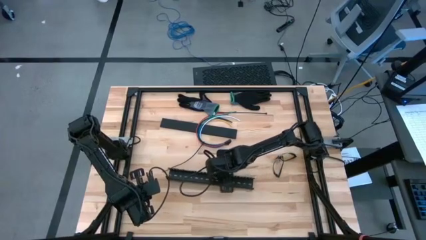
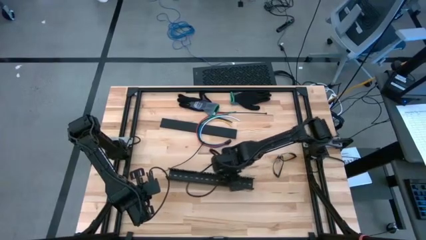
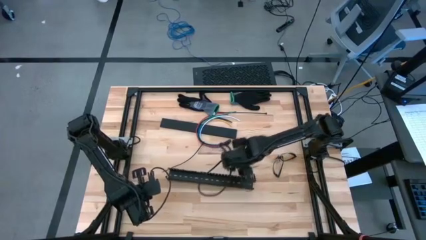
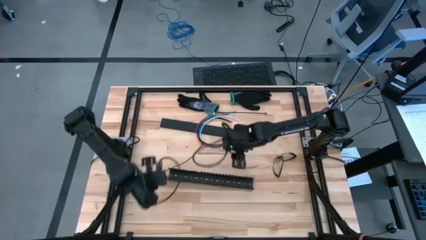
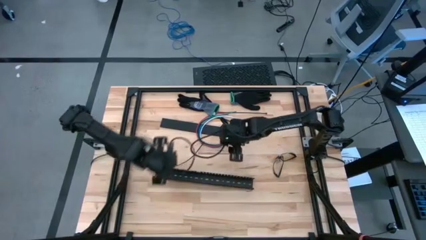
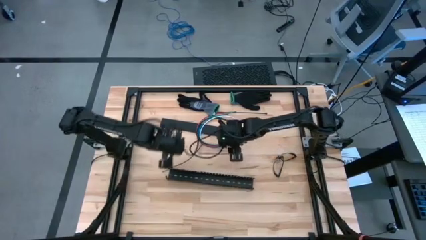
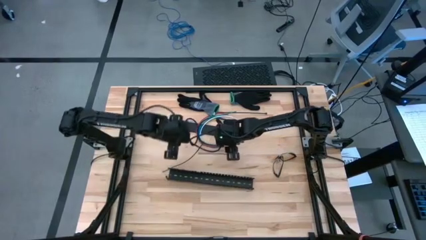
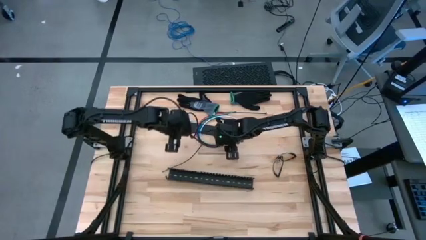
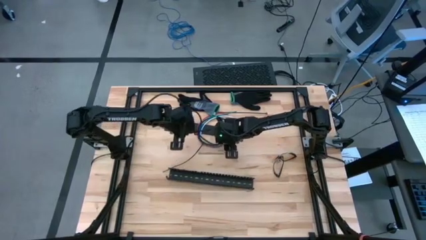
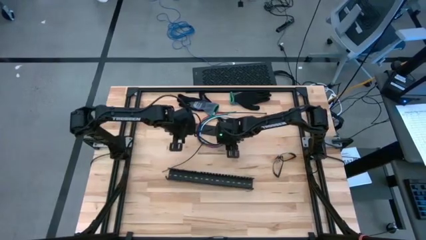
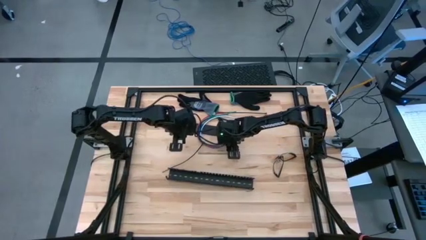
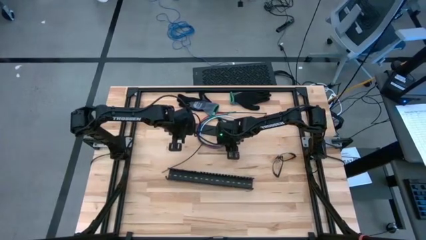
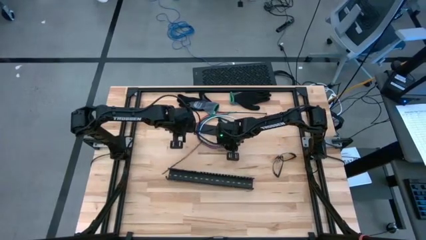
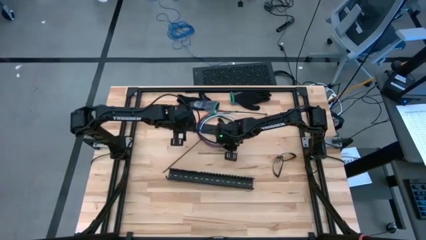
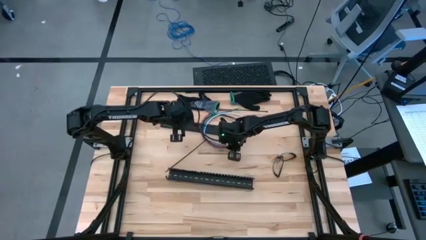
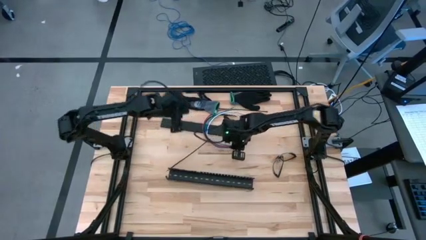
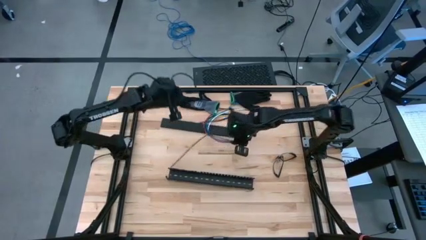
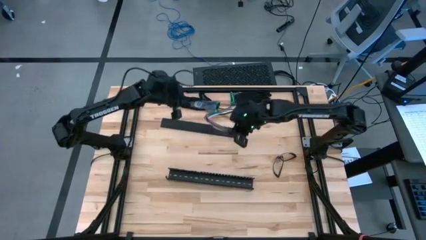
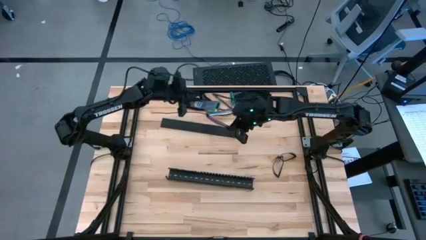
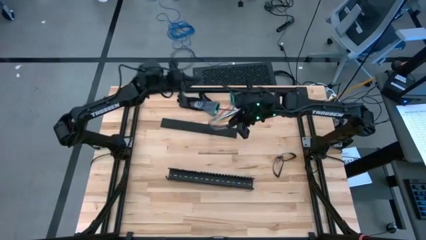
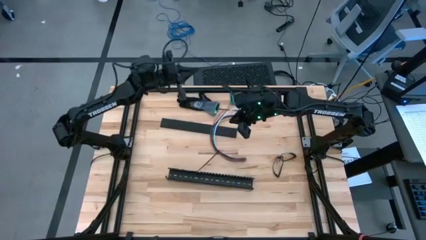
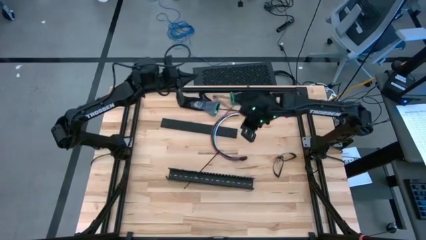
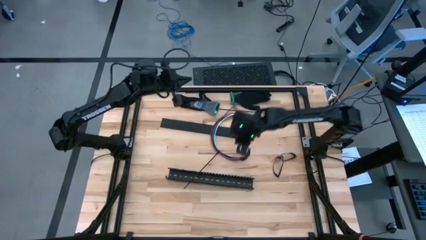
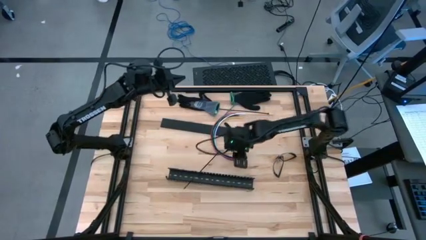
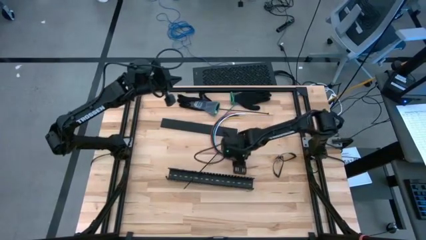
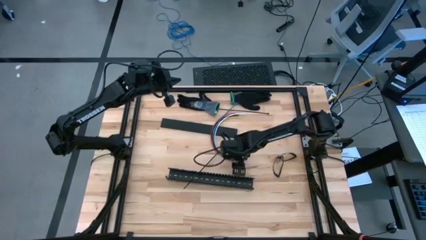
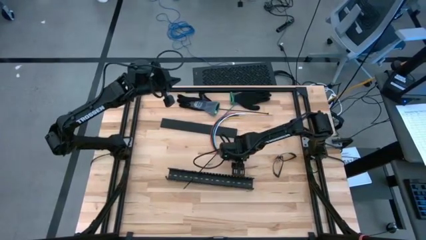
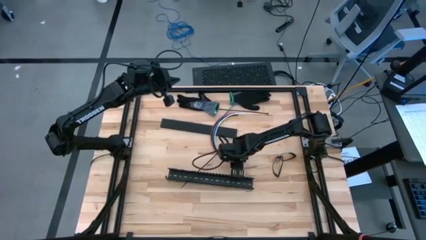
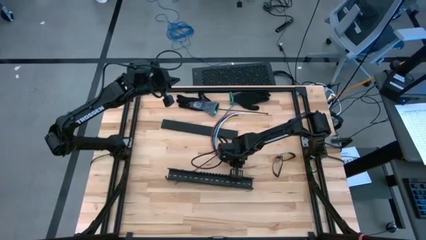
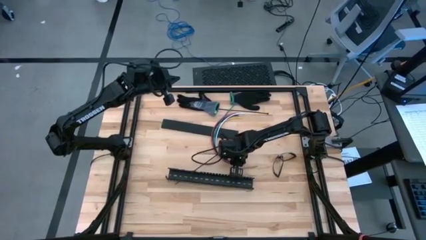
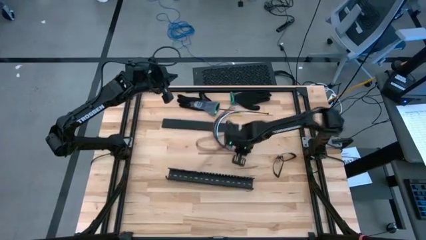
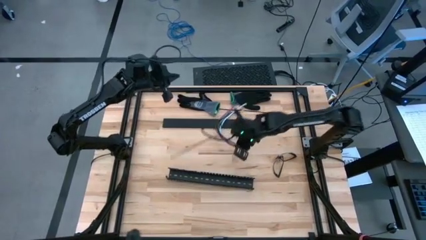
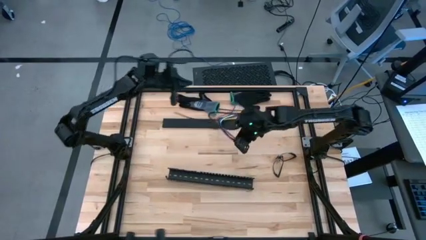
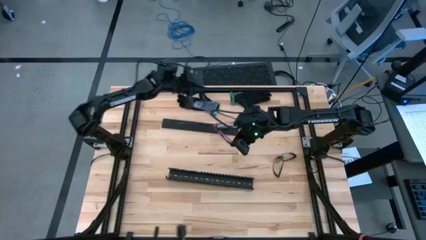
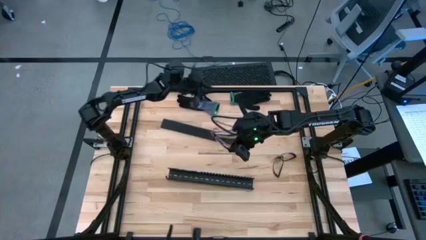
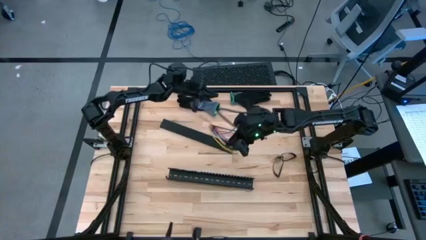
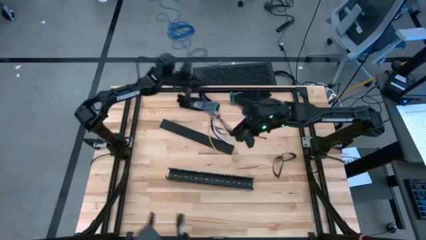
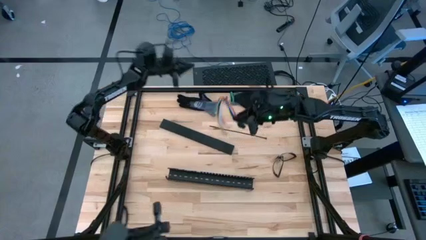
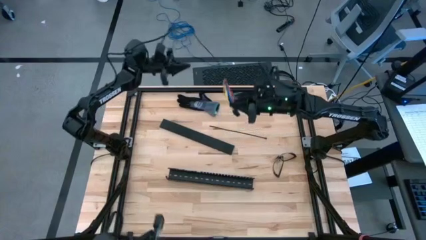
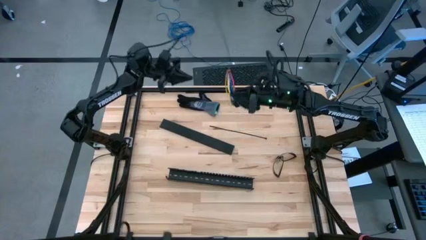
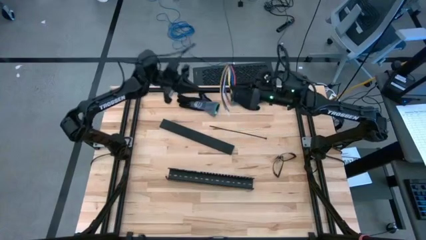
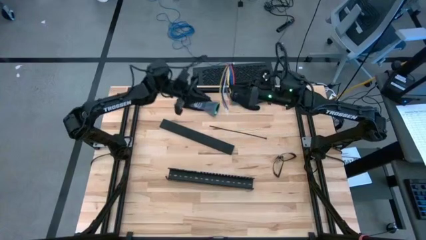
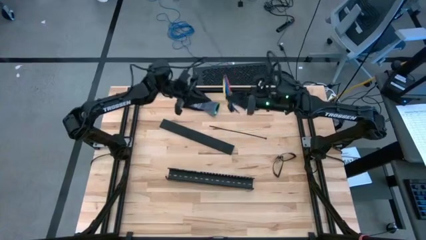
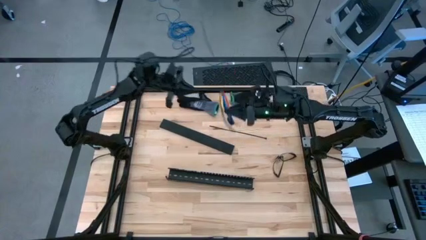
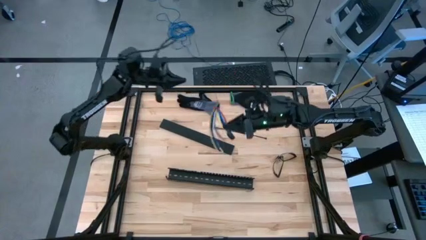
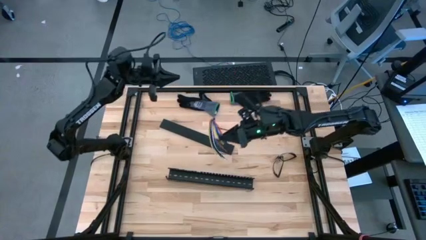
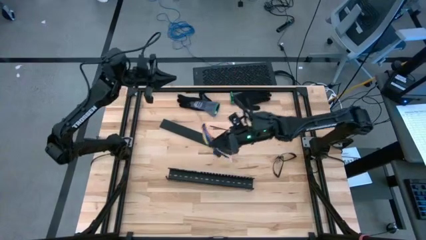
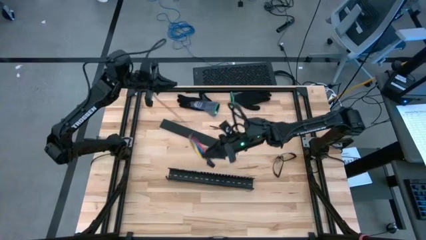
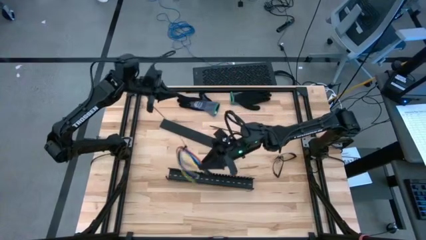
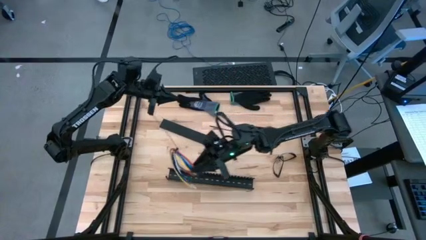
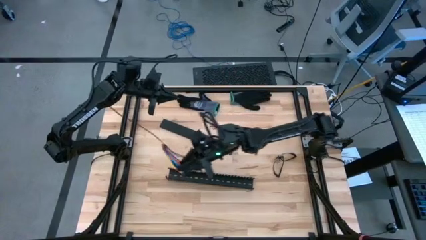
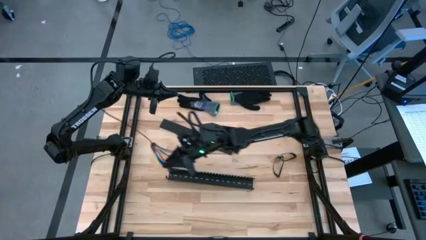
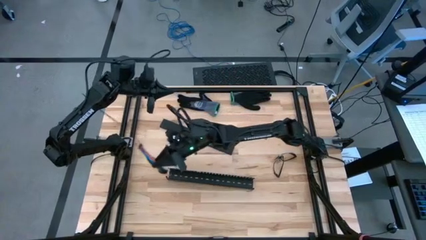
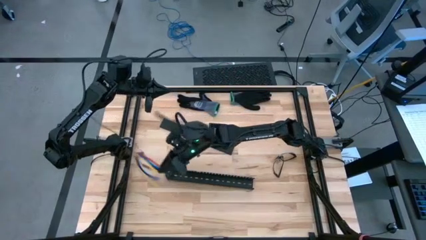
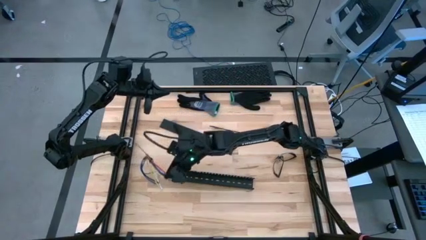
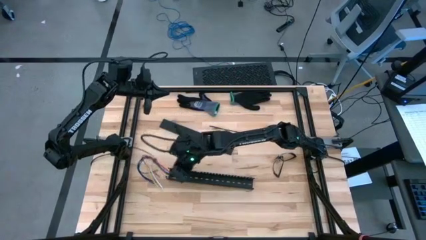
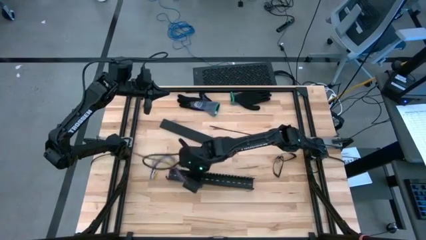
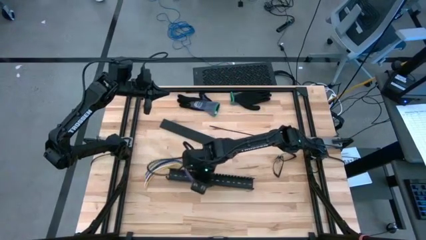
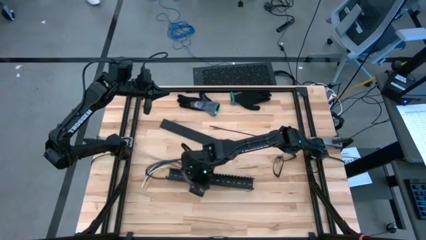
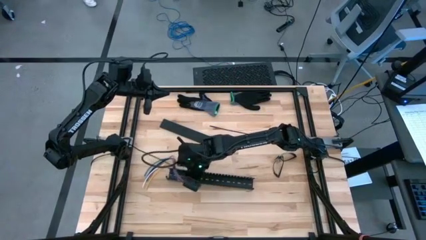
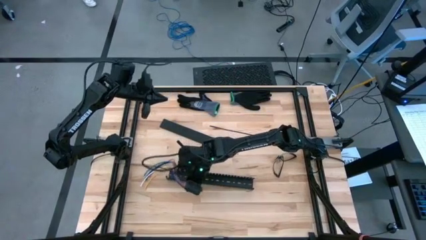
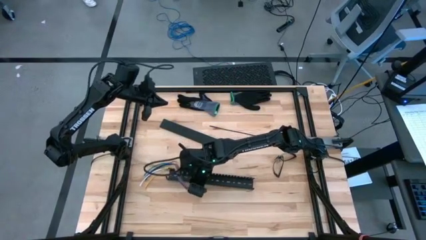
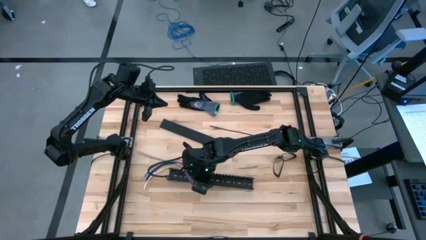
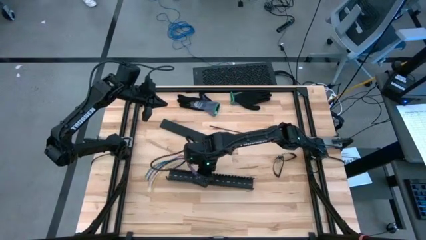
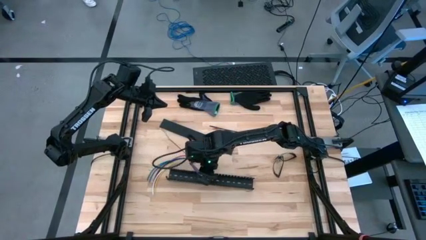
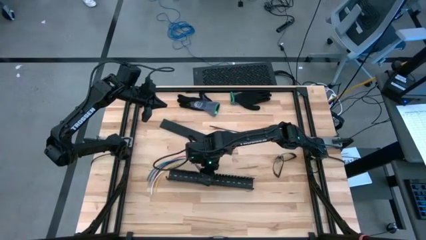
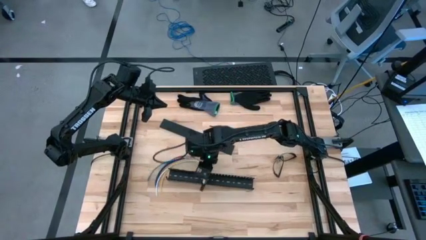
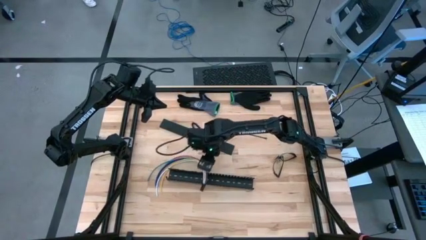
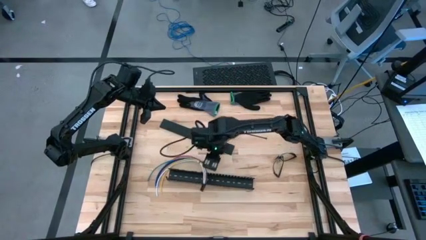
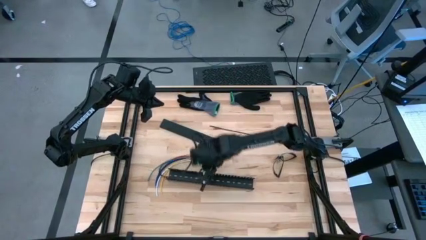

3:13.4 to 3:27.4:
Task: Ziptie cables
Insert the cable wire into the black cable duct
